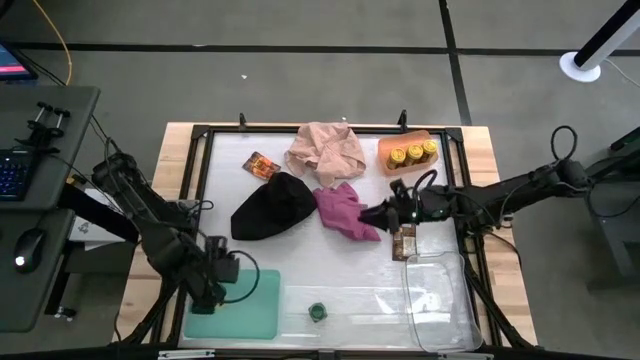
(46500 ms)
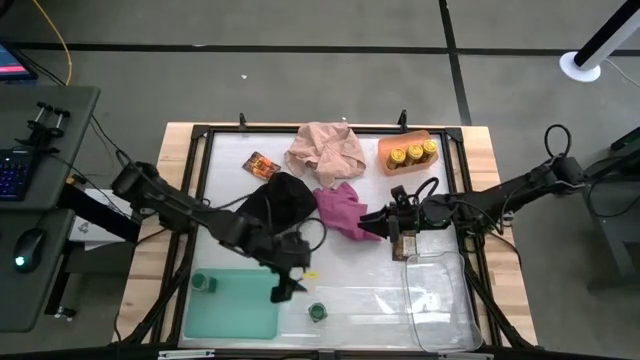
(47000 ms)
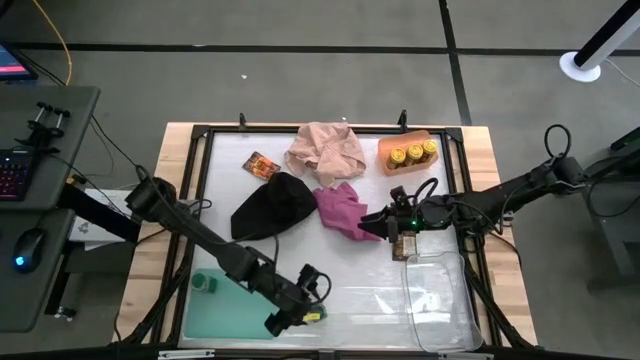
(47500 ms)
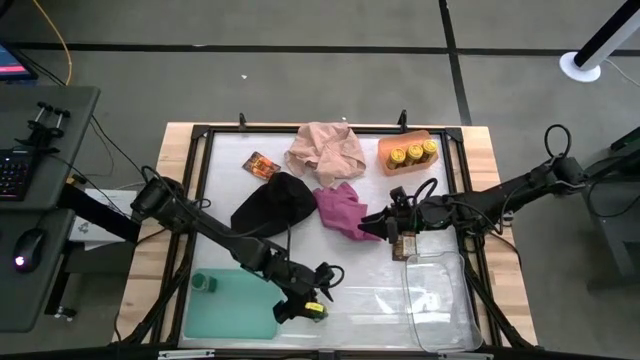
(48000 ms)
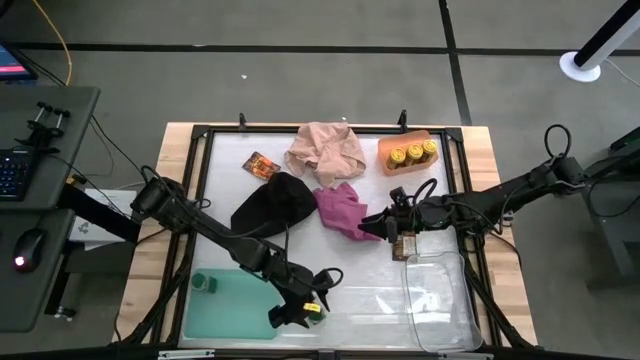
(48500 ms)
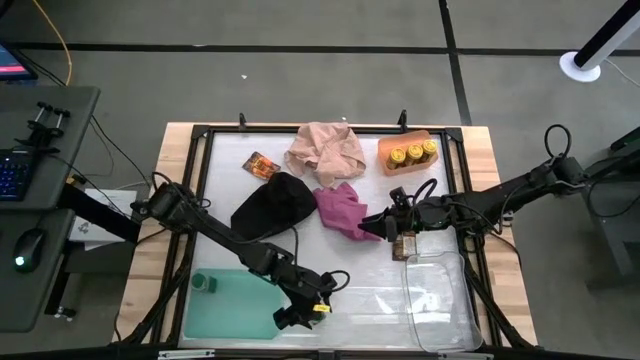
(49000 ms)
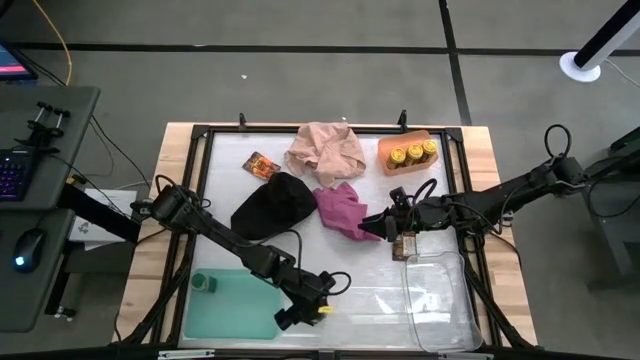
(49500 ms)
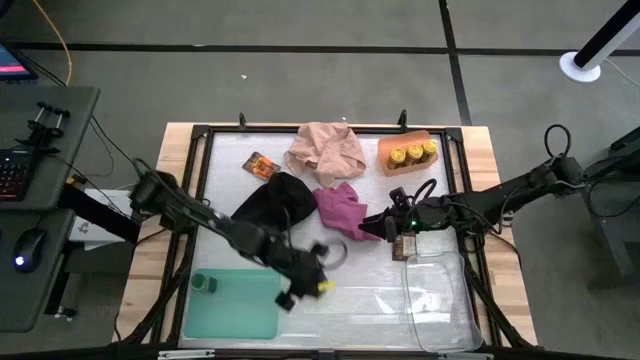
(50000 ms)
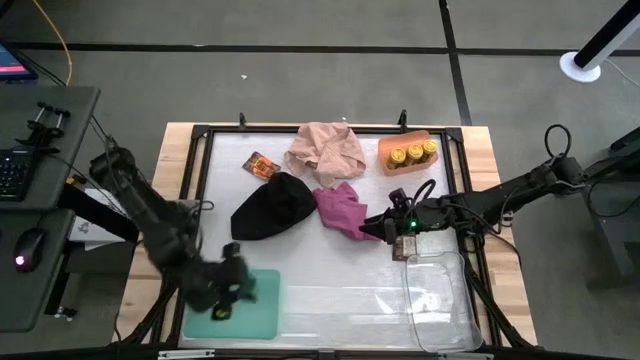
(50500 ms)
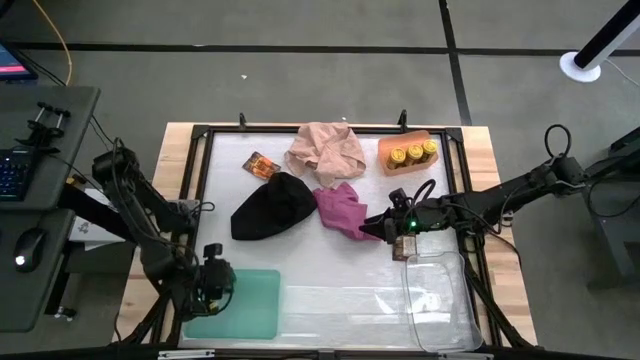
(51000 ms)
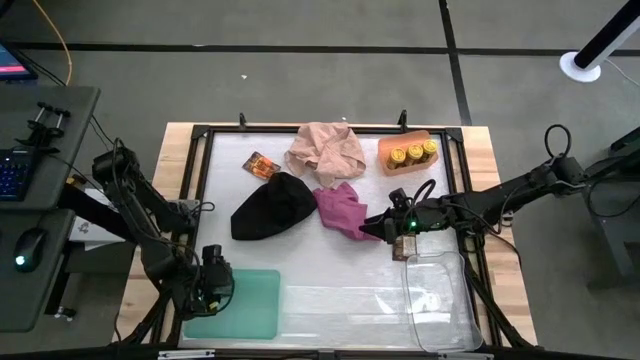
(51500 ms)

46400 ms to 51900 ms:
Task: Sort spices by type
Put the green seasoning bottle into the blue bin

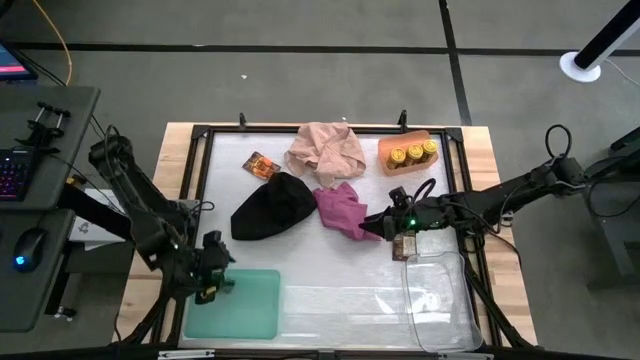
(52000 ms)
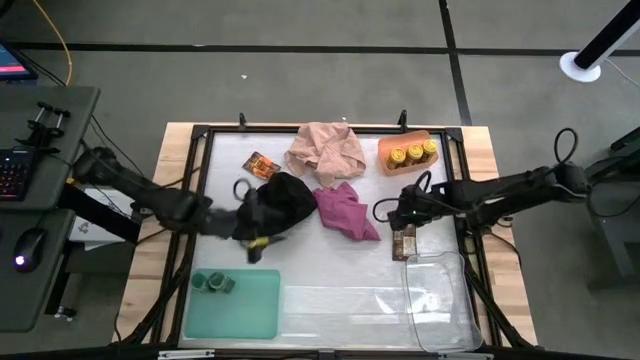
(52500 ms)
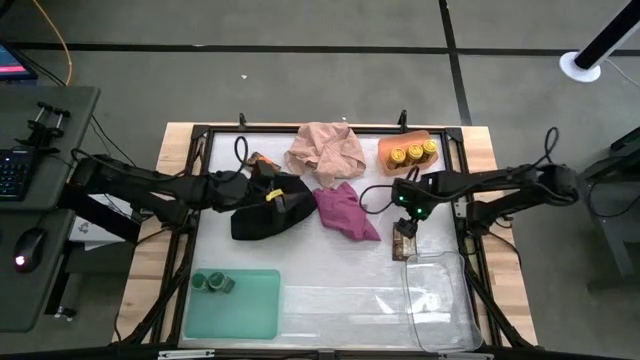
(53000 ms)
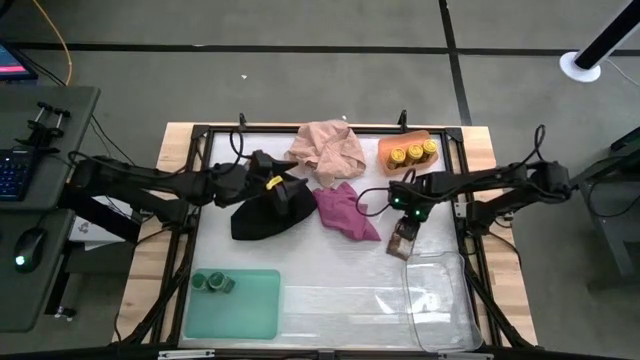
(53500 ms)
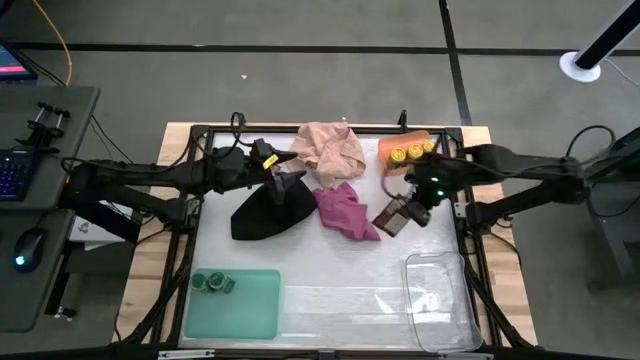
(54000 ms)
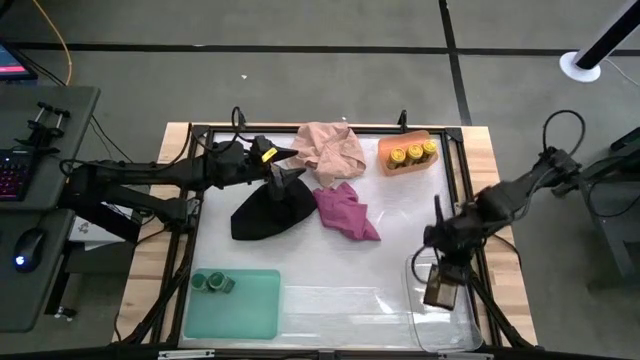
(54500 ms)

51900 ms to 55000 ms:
Put the bottom orange seasoning bag into the transparent bin

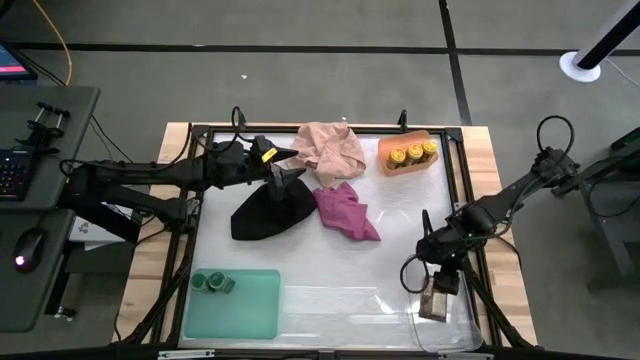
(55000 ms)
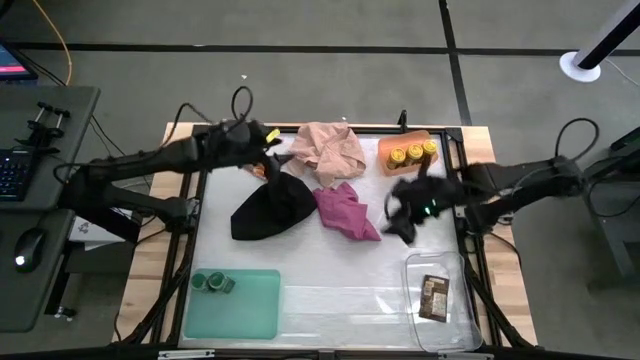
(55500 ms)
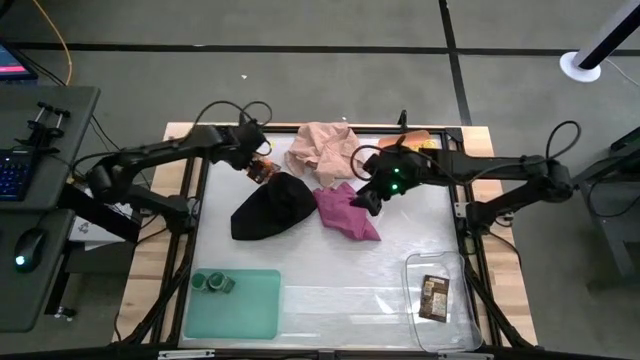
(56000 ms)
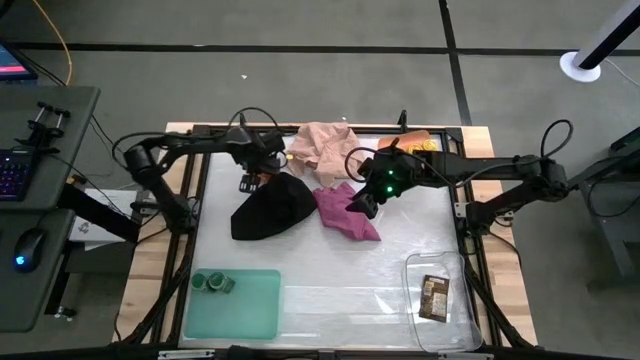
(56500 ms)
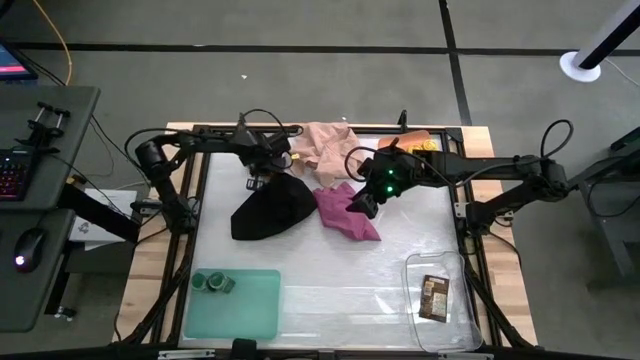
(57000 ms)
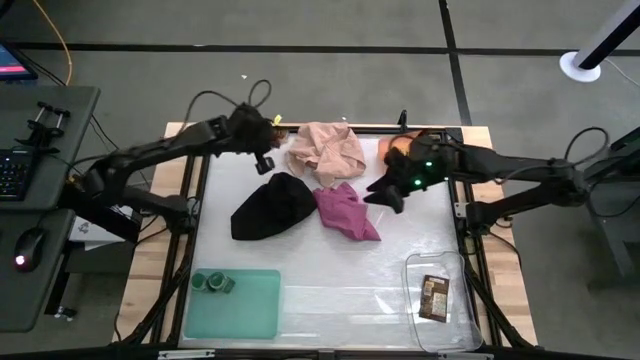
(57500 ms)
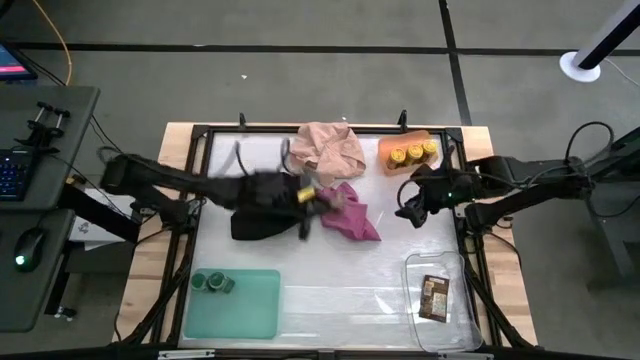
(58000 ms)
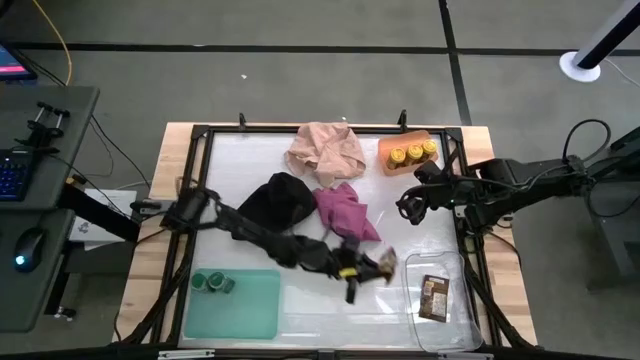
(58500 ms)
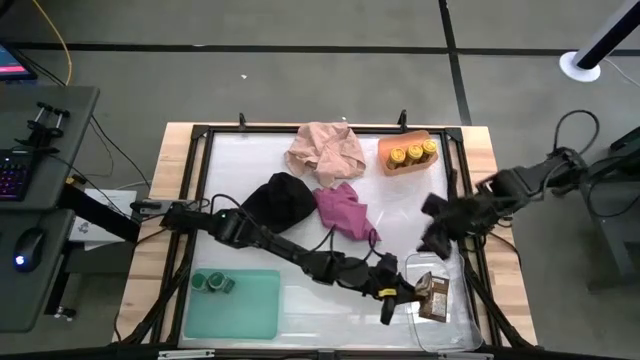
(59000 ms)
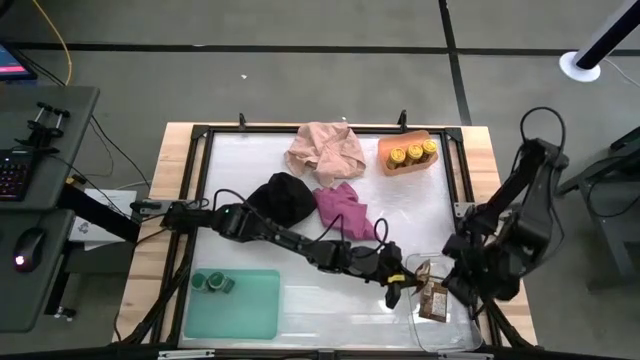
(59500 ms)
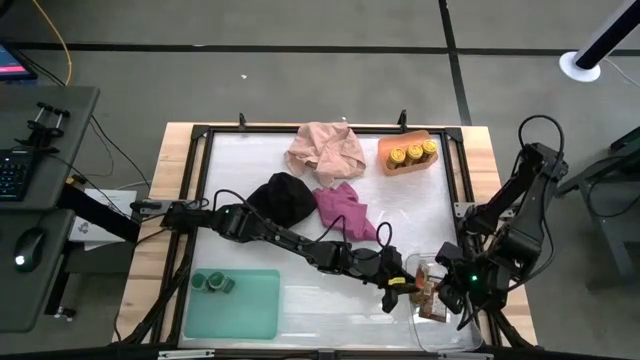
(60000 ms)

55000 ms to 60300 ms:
Put the orange seasoning bag into the transparent bin

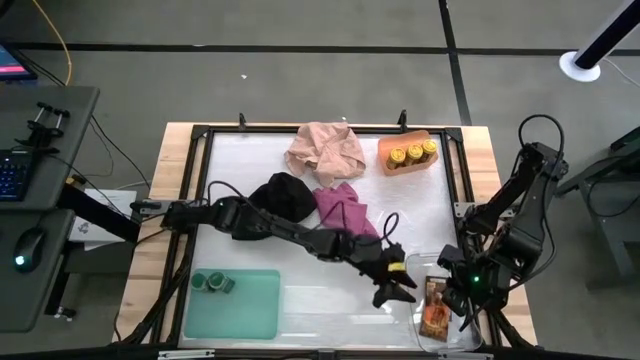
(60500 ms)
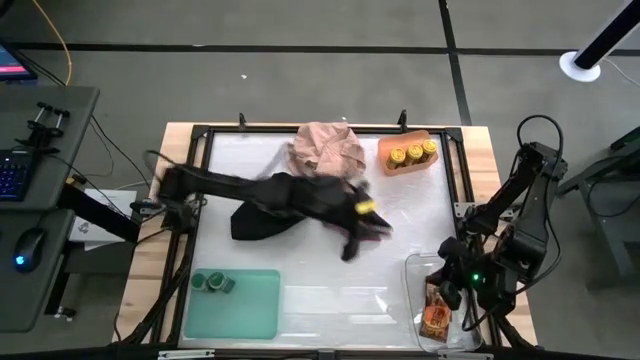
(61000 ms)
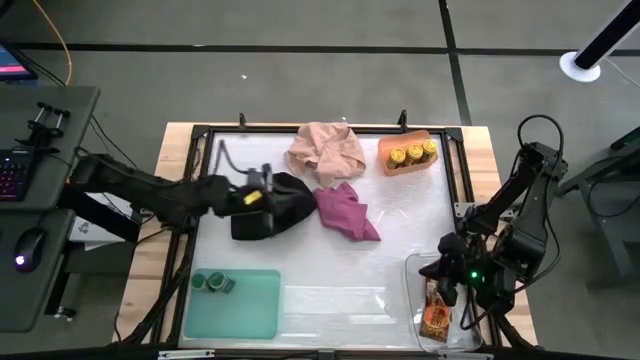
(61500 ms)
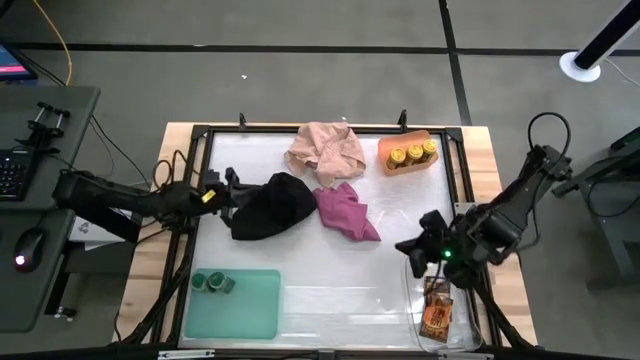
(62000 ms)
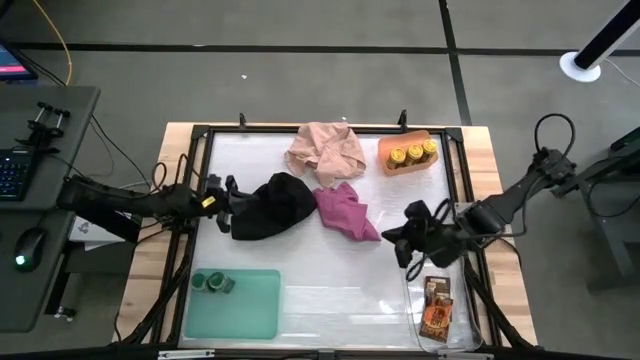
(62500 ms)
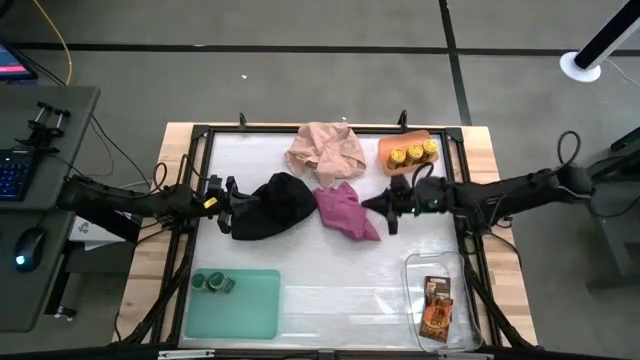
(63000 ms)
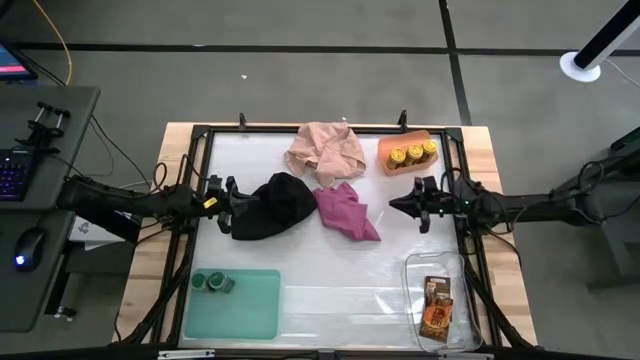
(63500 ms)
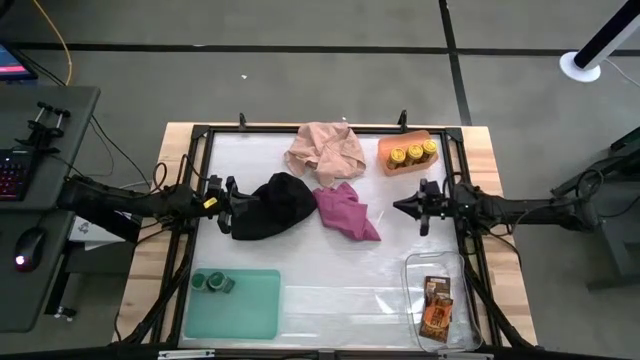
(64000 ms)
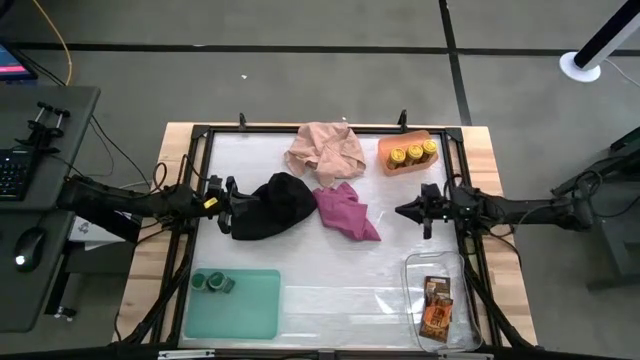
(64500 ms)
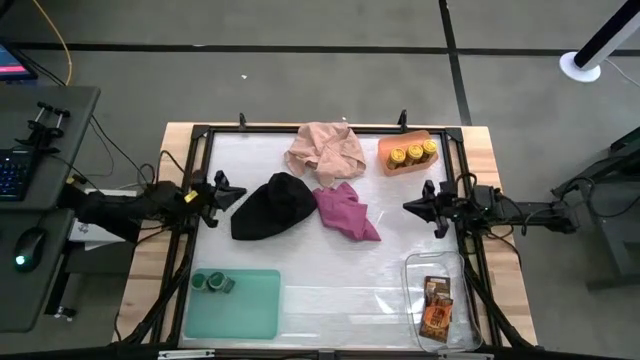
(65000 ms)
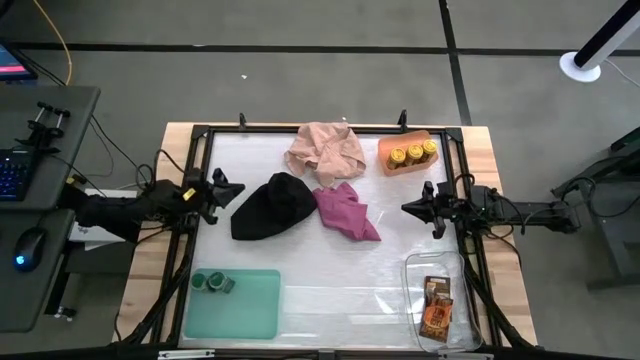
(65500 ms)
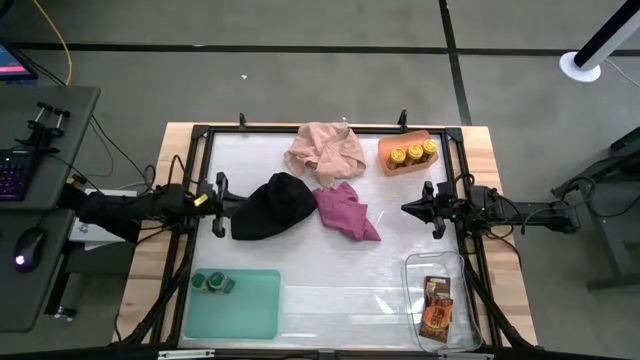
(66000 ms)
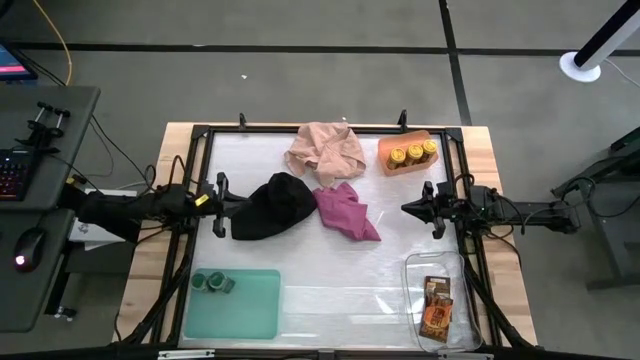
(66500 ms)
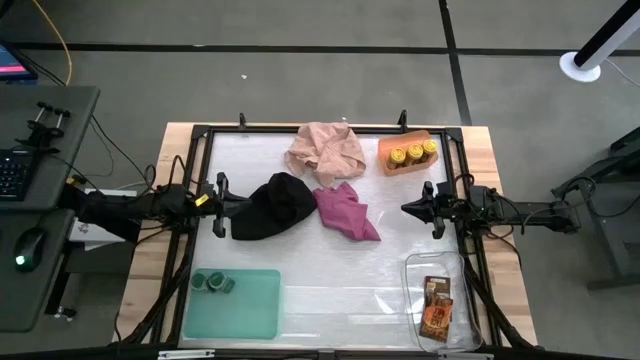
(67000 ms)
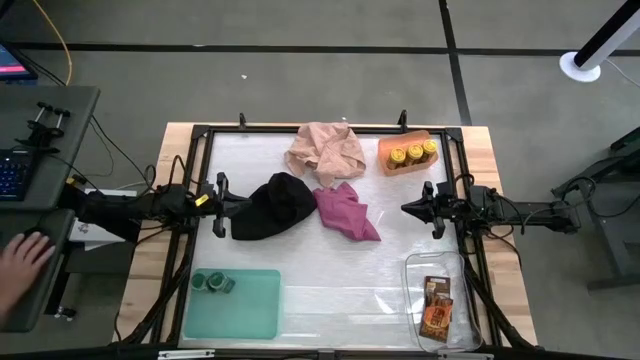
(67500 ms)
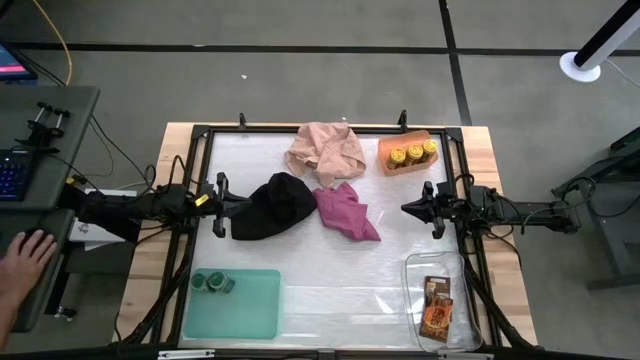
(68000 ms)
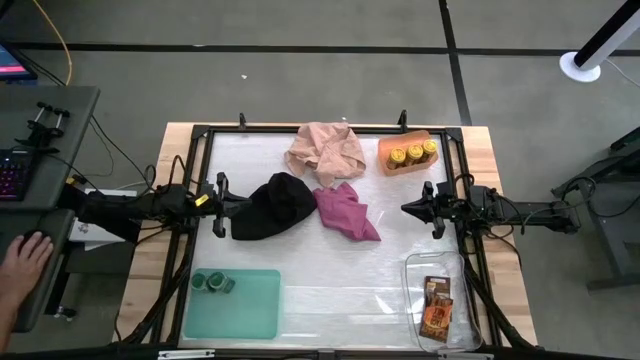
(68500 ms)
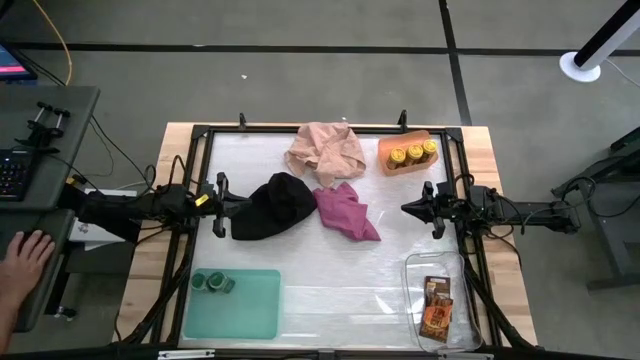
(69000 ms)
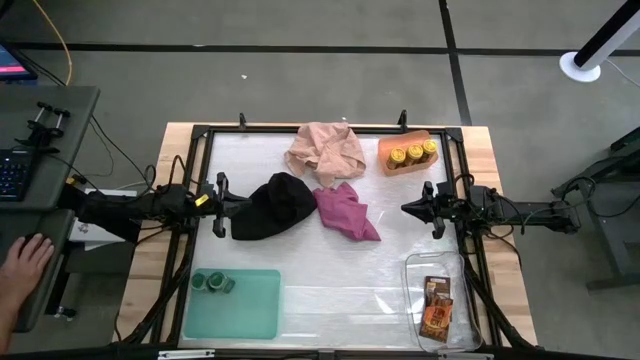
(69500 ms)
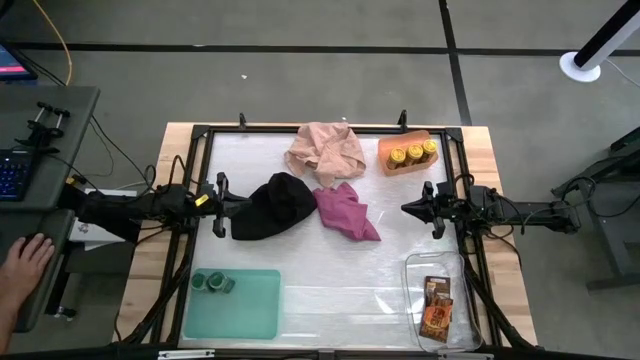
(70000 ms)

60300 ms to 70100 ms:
Return to Home Position
